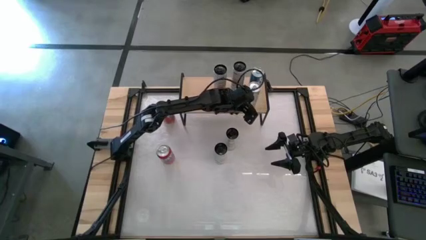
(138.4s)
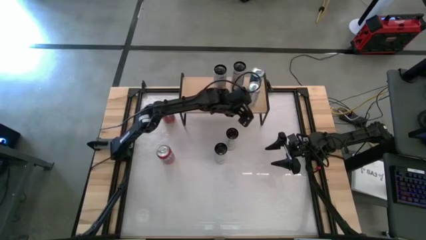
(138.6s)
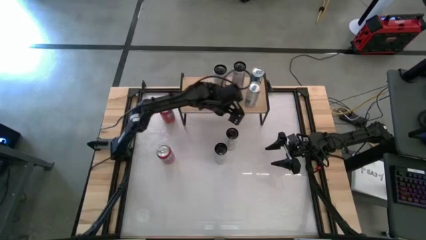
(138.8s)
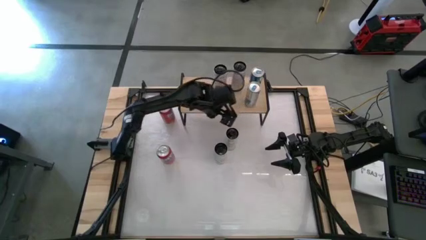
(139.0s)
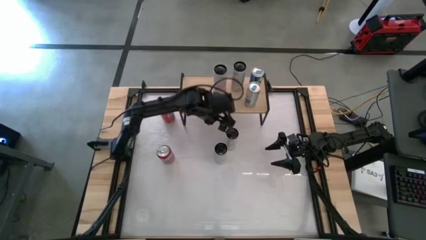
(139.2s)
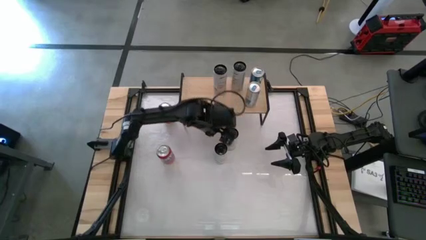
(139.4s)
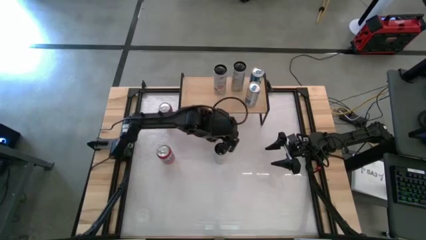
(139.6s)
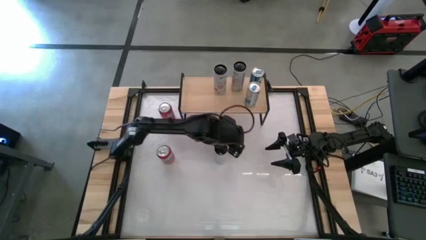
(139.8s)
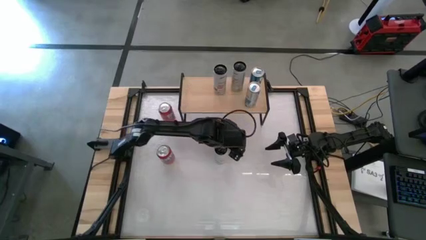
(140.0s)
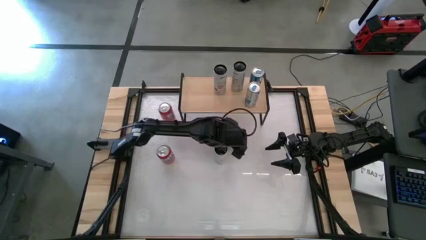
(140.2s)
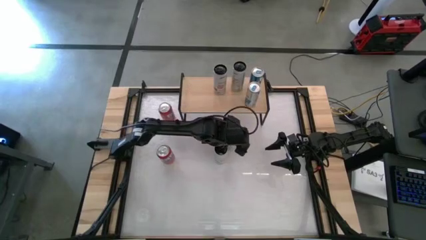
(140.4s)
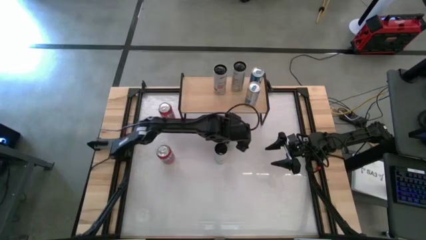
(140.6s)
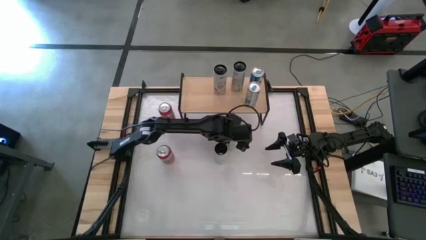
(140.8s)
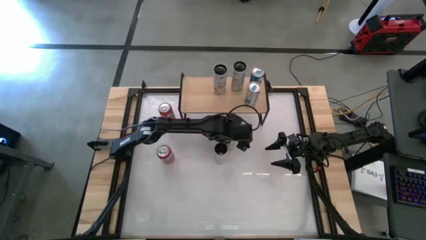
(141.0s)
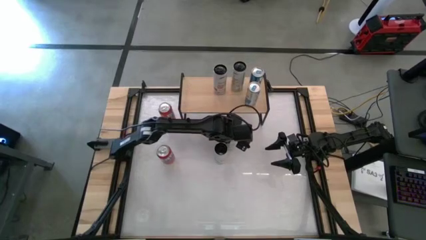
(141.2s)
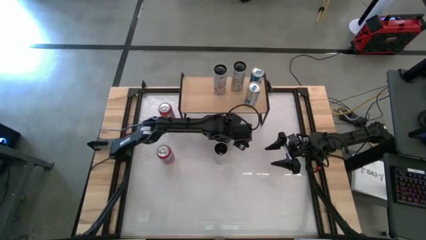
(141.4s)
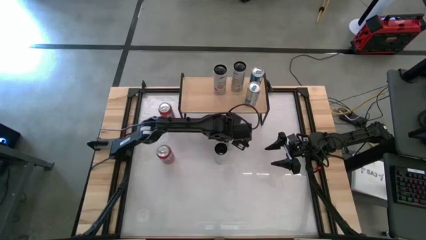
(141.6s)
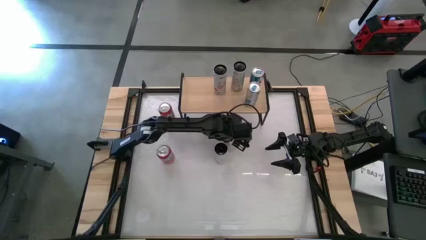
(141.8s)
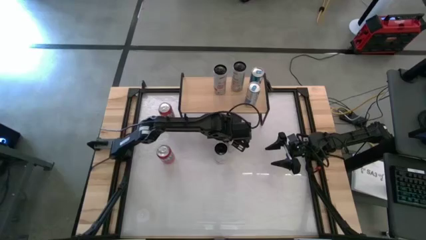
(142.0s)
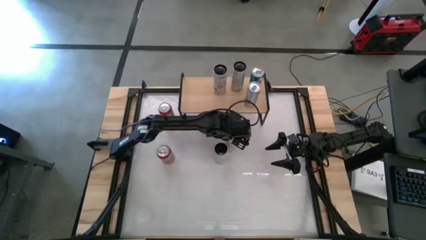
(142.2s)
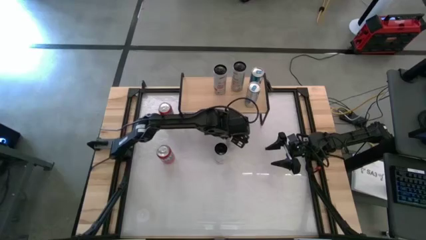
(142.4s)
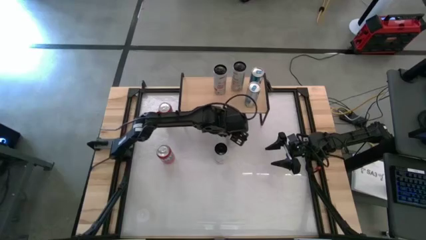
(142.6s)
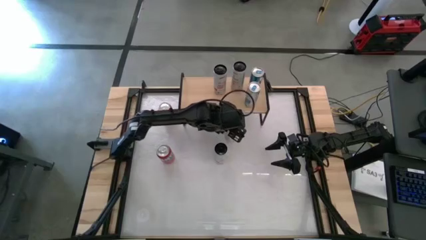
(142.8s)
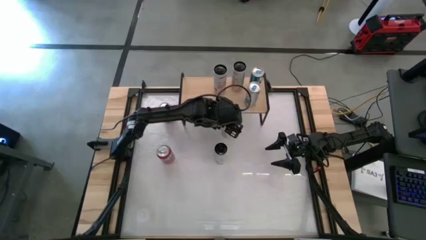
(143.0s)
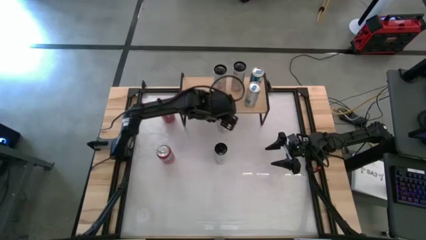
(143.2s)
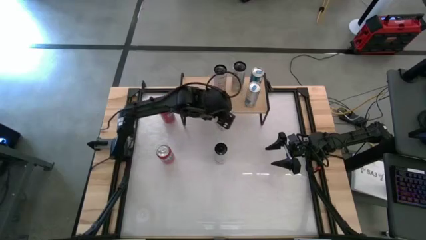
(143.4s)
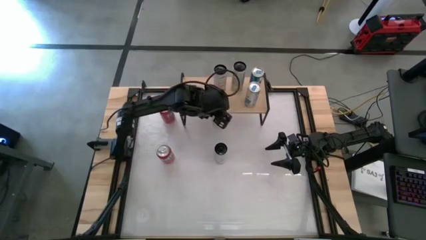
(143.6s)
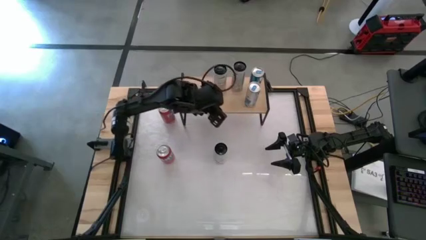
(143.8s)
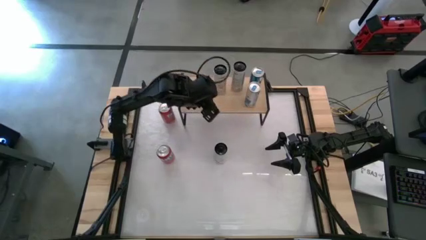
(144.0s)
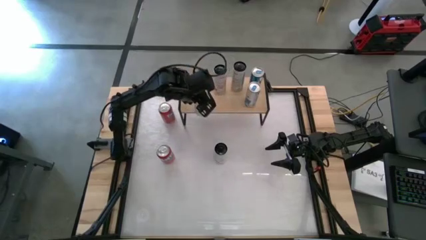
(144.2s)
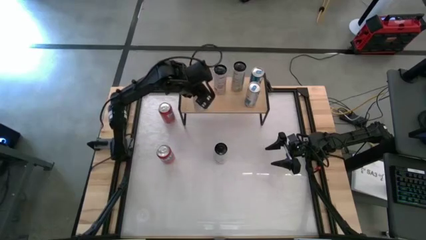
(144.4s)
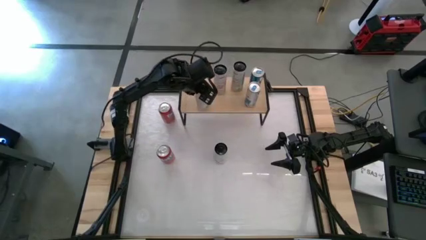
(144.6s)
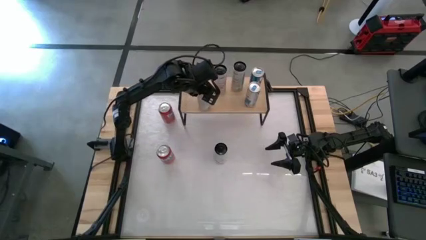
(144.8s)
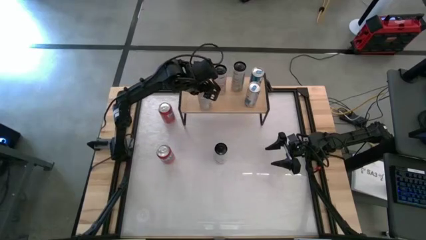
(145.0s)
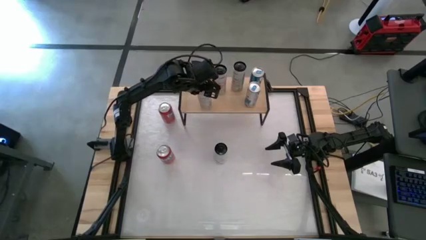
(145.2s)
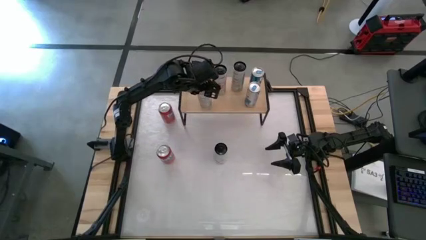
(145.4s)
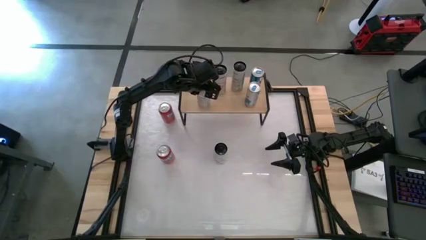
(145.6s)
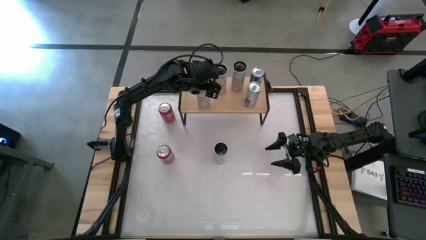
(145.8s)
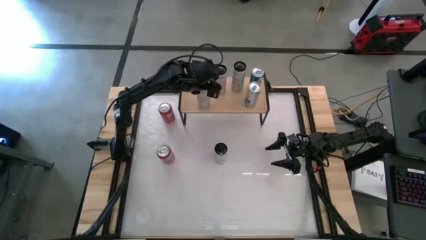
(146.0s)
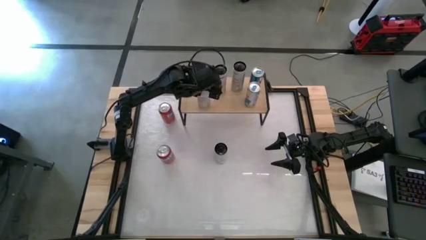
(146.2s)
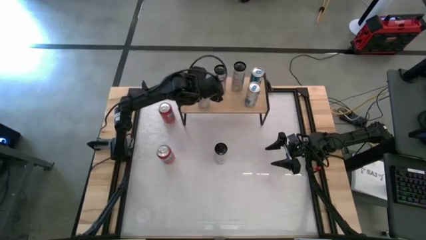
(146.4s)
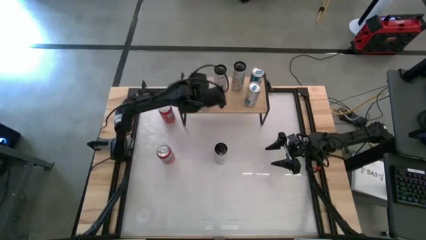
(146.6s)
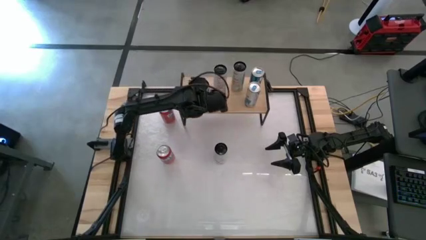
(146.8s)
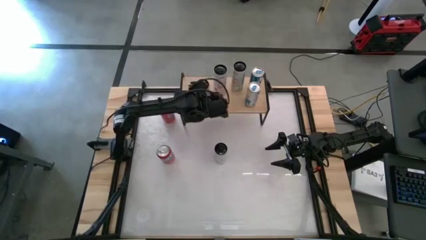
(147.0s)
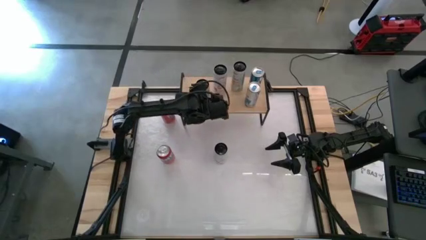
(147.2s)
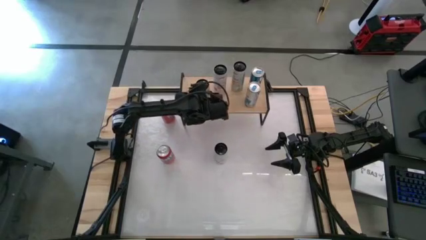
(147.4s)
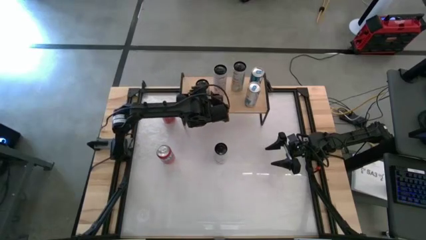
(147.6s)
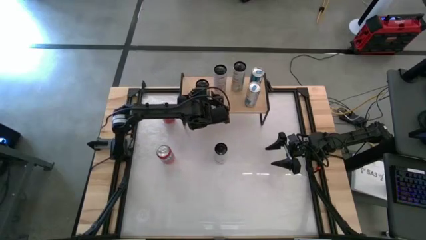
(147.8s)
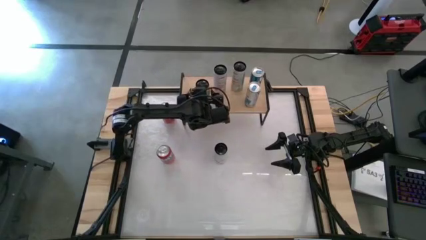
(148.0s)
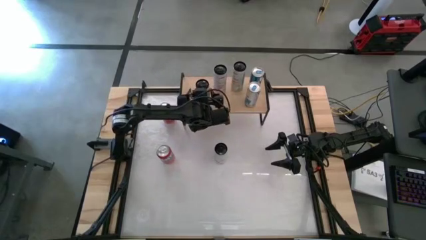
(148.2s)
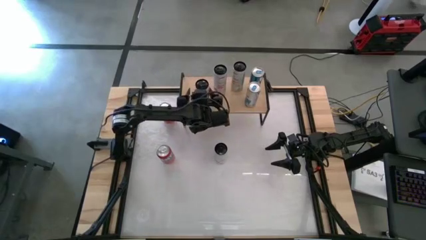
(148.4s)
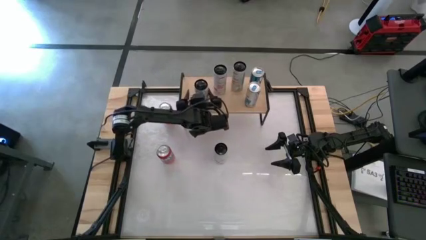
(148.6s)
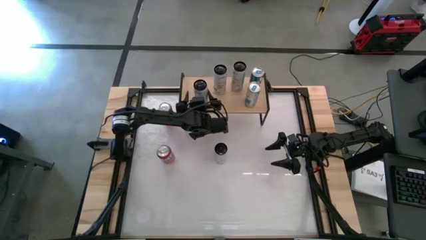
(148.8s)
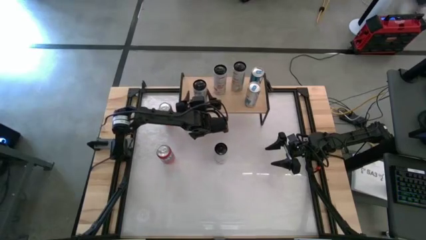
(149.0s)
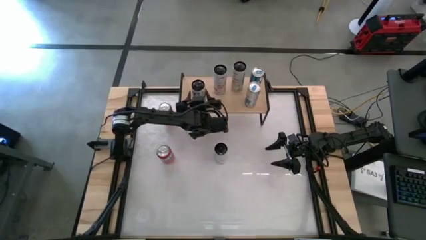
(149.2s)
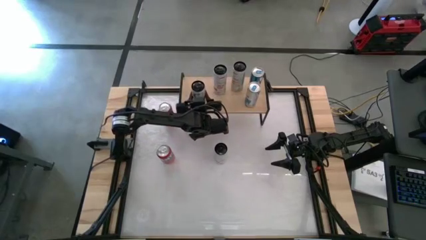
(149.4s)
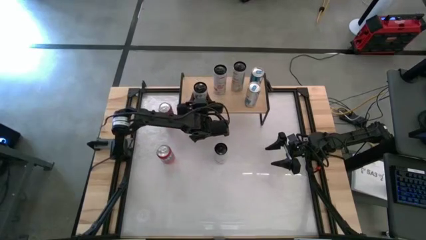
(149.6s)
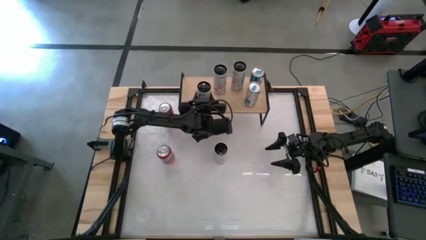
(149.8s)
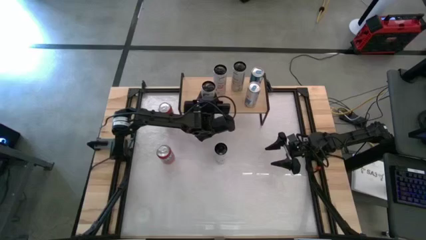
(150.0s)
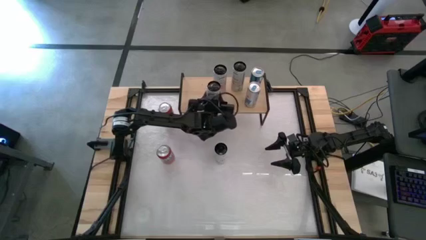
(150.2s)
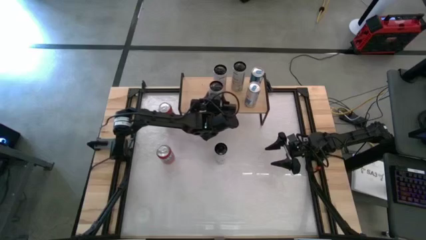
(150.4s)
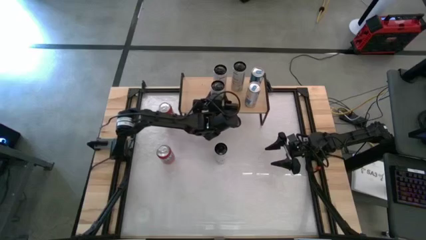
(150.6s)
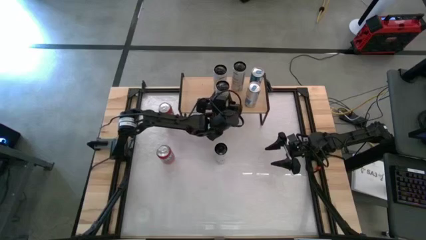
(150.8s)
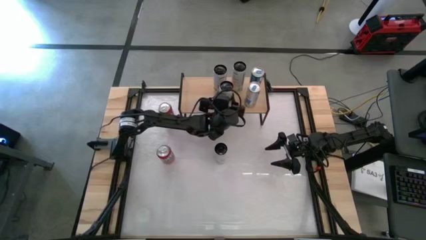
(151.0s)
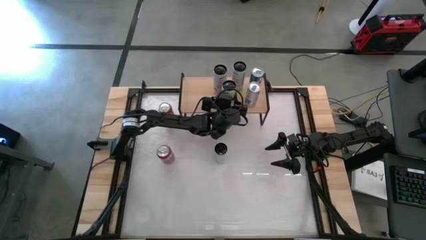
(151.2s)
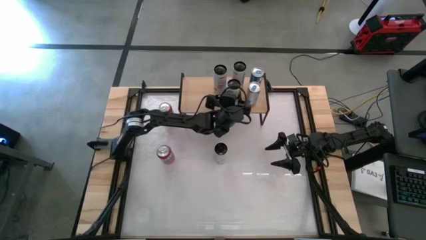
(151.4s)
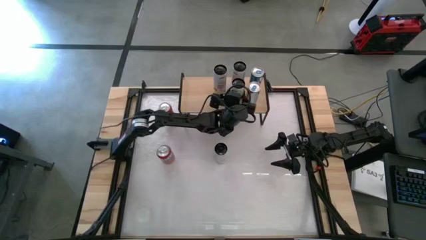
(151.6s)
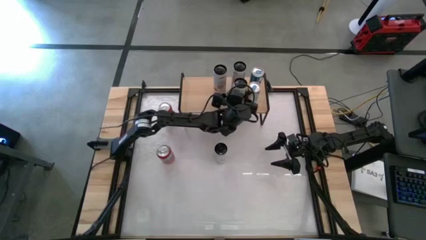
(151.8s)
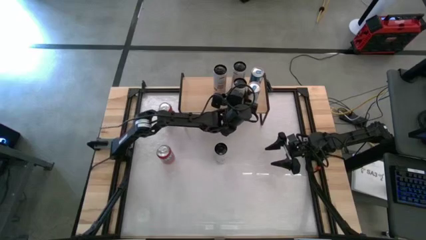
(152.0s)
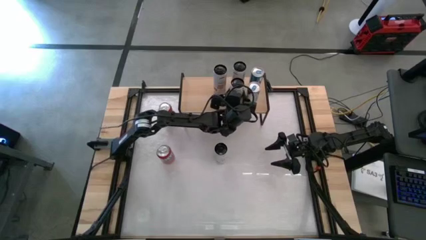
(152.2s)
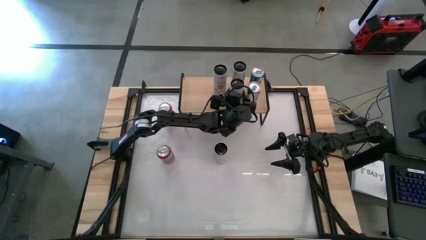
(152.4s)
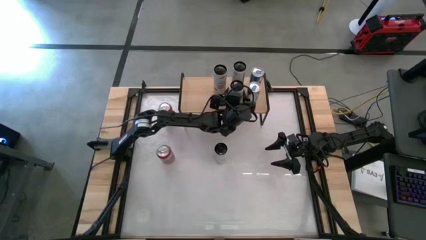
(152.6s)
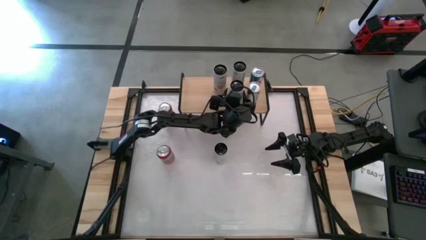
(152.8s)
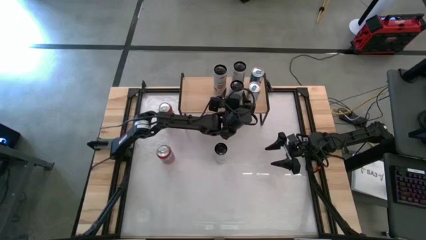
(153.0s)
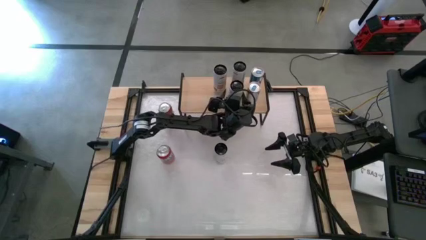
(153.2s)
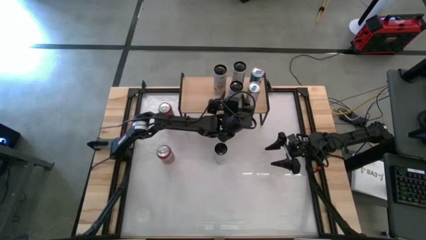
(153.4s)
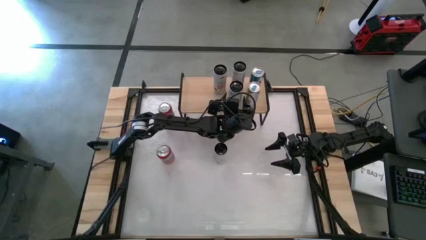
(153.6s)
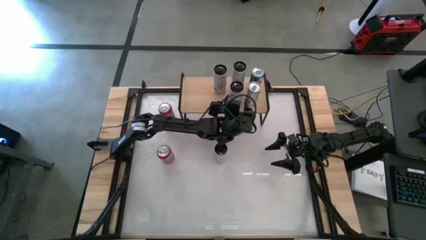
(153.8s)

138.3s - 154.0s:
Task: Place canned beverage on shelf
Put the white yellow soda can on the shelf aligned with the other white yellow soda can
